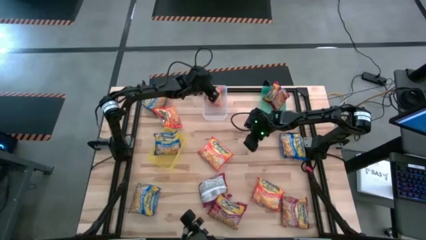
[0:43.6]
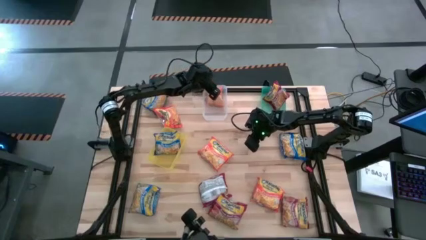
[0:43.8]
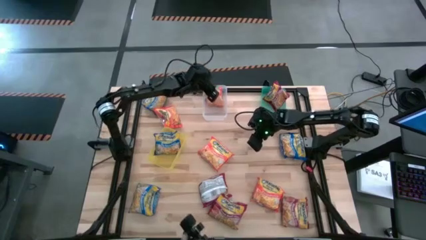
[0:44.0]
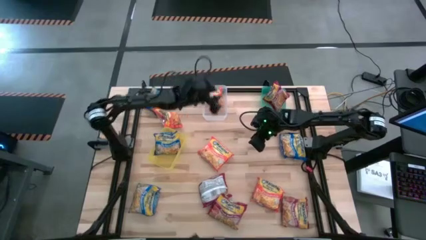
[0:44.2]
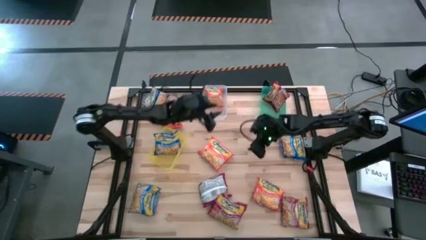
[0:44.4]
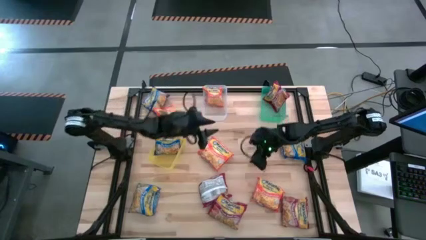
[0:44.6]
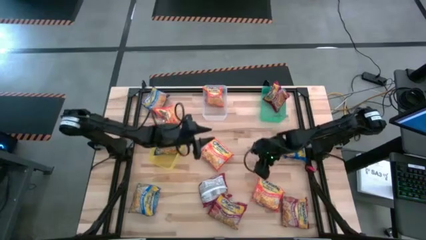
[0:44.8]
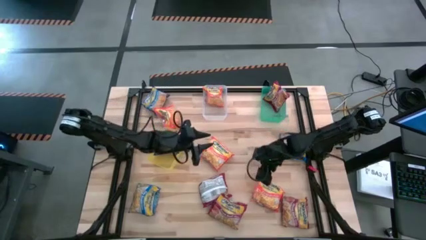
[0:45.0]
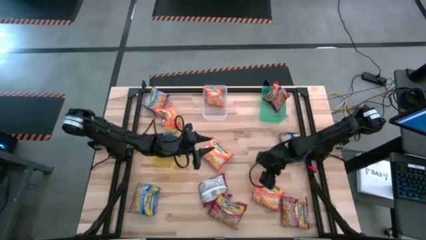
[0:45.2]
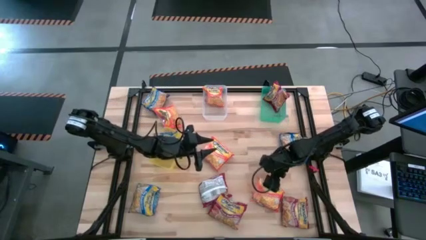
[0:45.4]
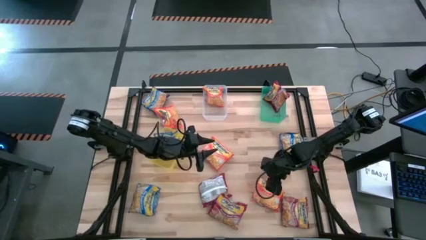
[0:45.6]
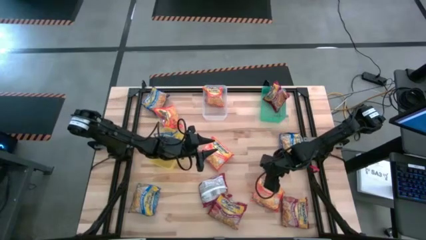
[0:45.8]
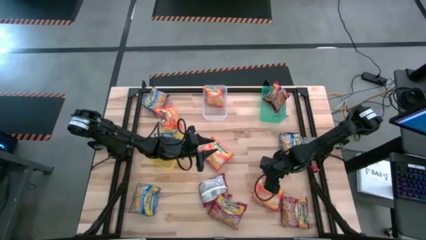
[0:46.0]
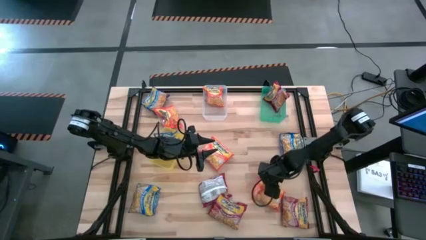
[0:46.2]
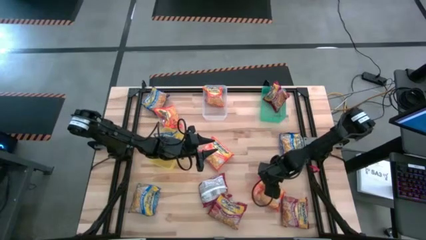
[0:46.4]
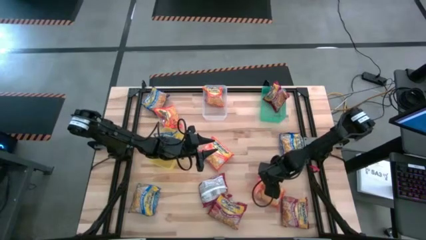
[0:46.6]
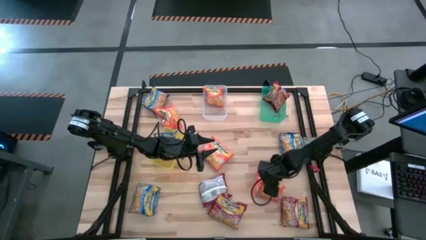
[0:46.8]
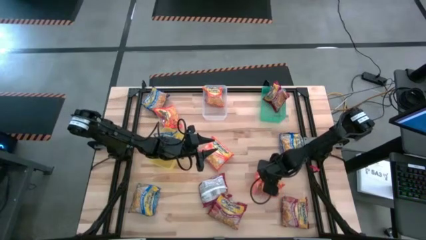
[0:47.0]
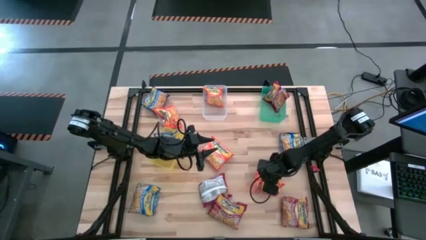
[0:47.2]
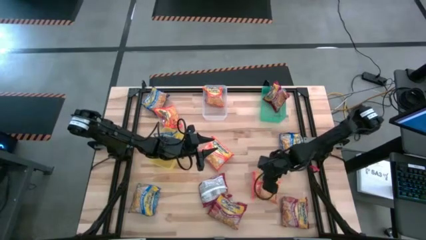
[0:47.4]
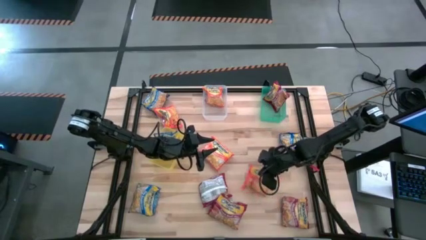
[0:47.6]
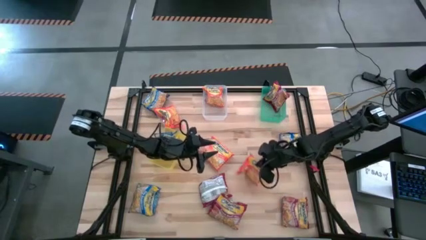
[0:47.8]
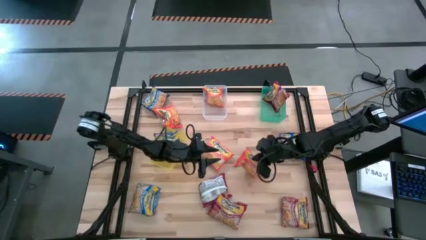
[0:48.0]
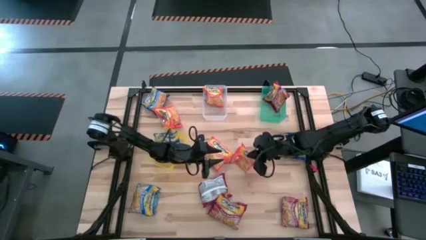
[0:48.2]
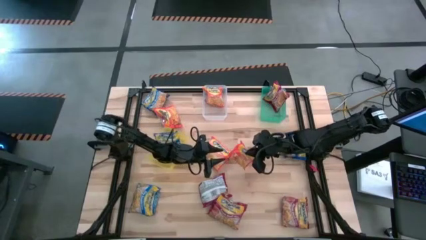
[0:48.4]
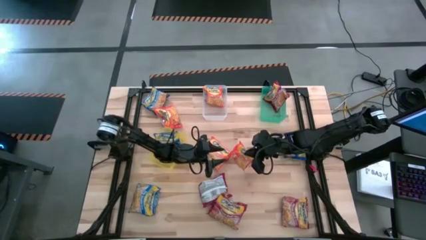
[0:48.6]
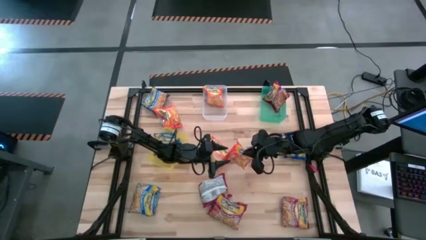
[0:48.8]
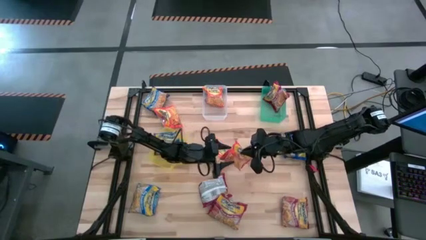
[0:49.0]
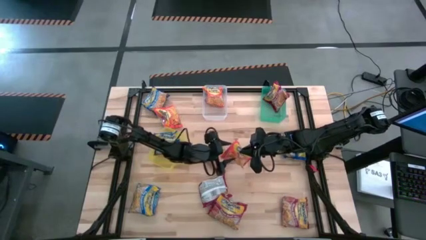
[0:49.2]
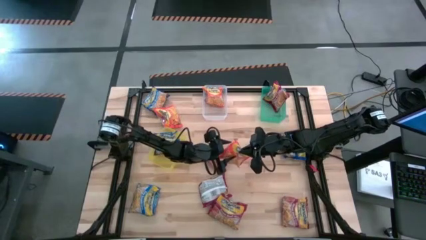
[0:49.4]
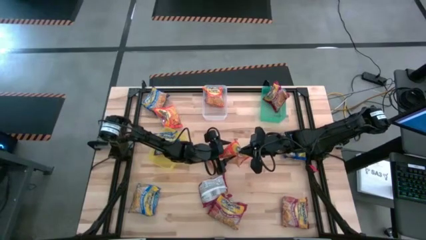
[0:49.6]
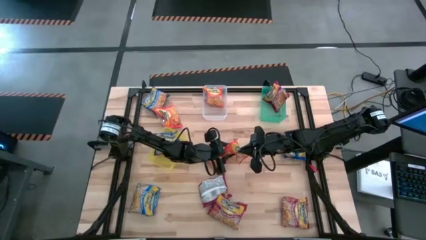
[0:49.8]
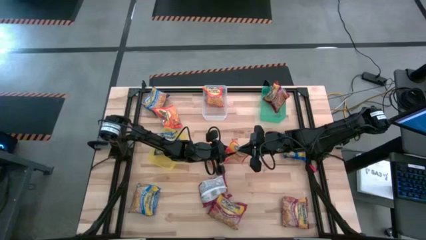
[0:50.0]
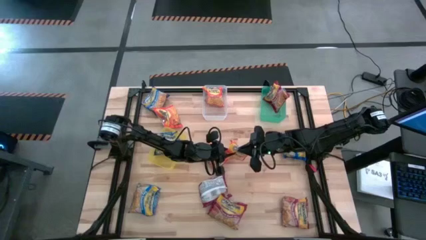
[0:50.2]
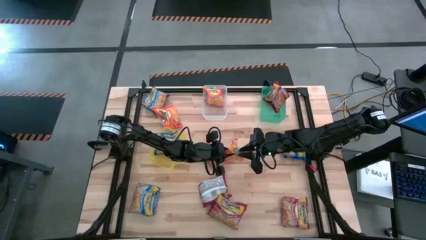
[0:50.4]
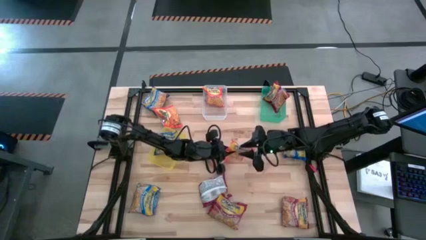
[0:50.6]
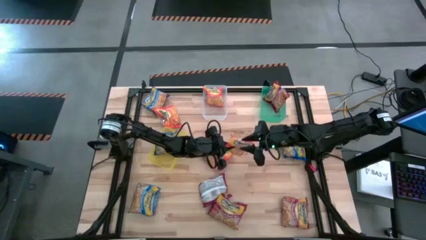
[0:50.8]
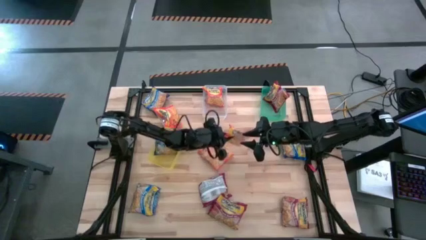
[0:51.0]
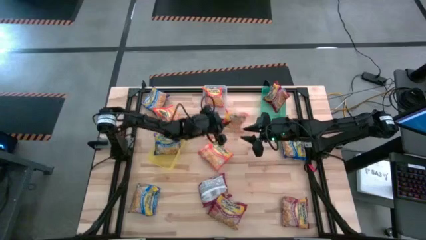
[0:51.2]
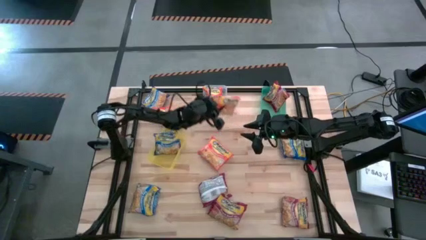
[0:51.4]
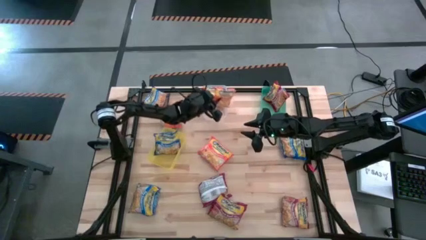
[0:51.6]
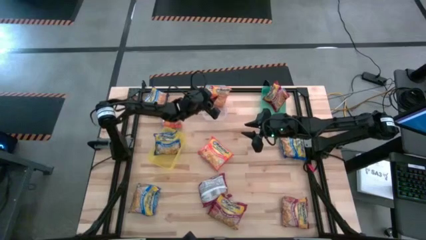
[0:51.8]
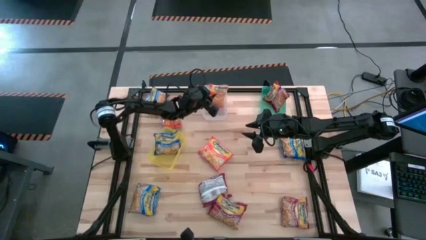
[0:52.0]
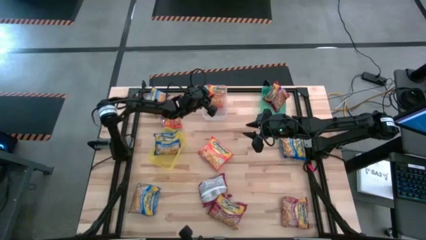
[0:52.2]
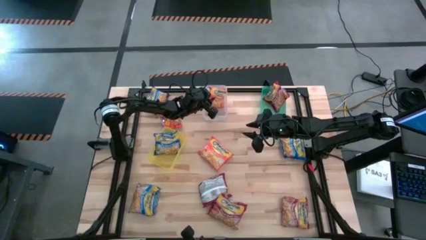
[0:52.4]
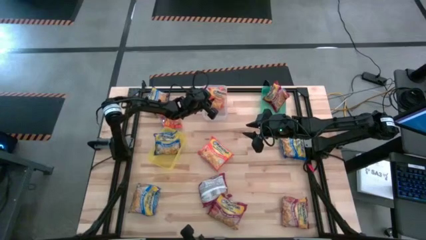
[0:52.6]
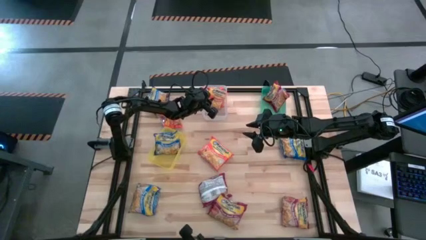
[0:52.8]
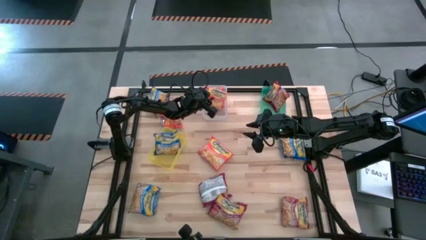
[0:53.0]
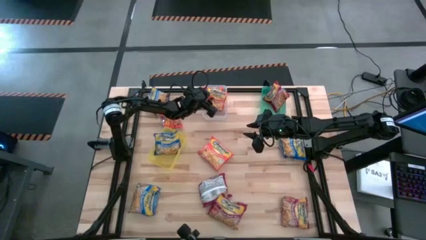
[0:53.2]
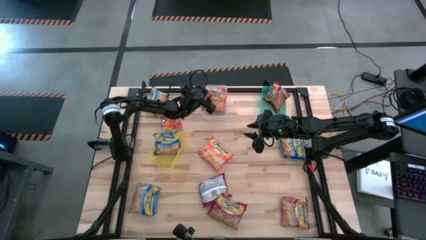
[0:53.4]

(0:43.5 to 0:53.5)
Task: Sort Maruchan noodles
Put the orange noodle pack into the transparent bin

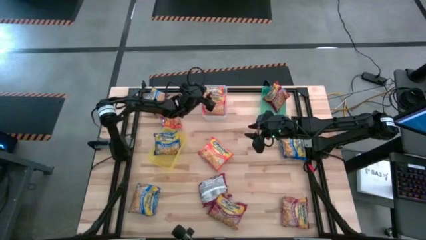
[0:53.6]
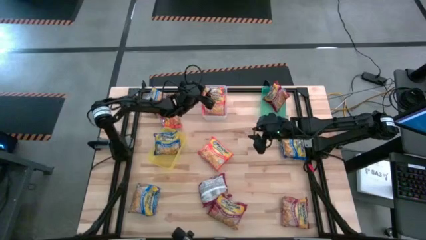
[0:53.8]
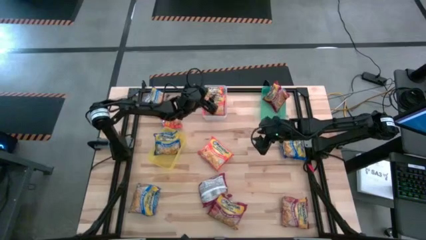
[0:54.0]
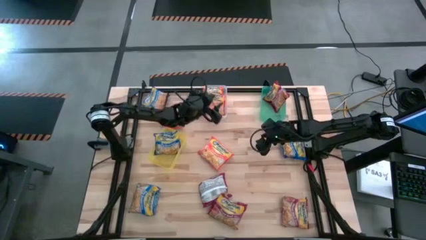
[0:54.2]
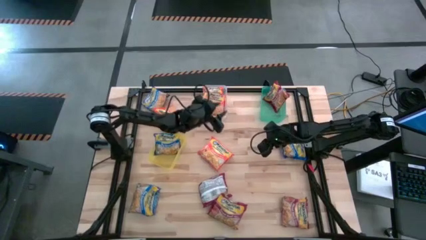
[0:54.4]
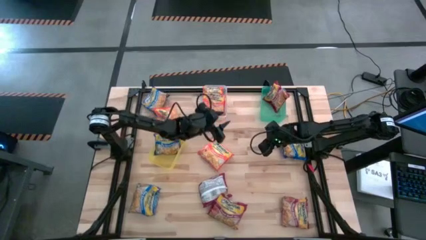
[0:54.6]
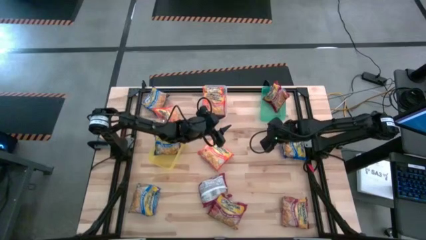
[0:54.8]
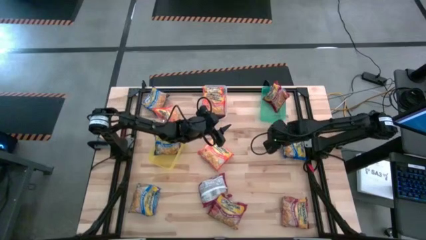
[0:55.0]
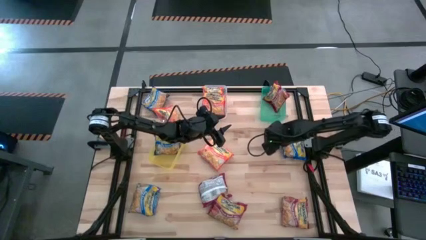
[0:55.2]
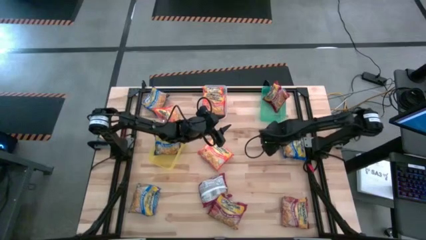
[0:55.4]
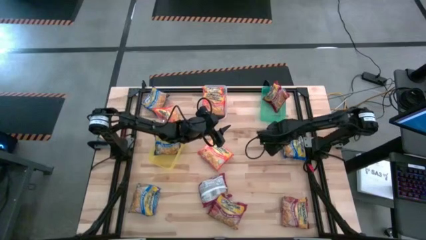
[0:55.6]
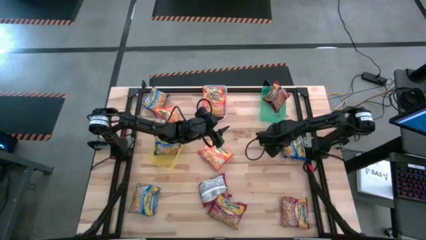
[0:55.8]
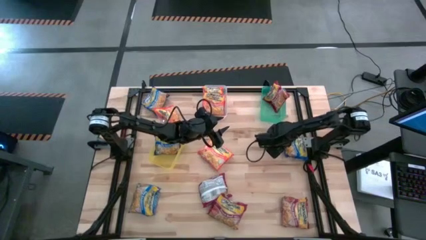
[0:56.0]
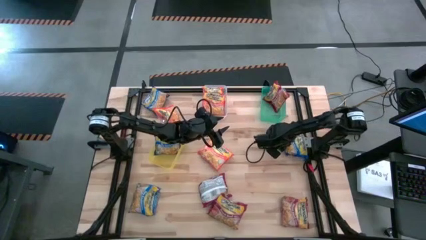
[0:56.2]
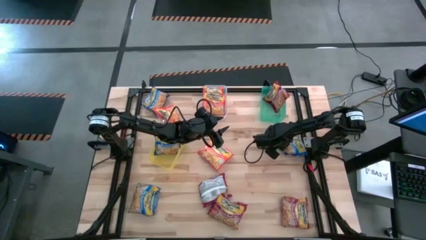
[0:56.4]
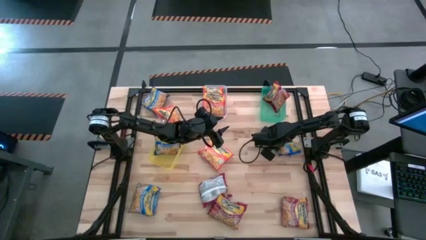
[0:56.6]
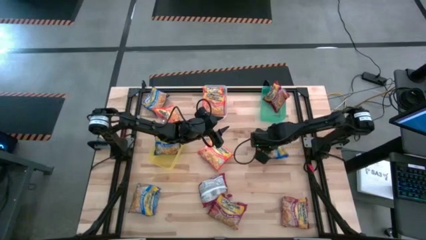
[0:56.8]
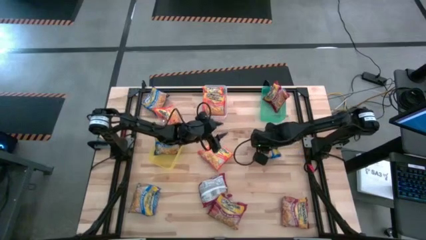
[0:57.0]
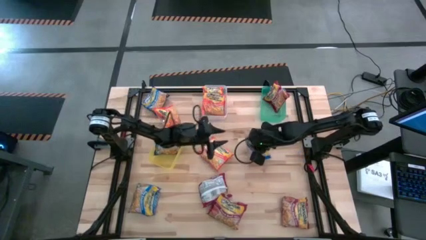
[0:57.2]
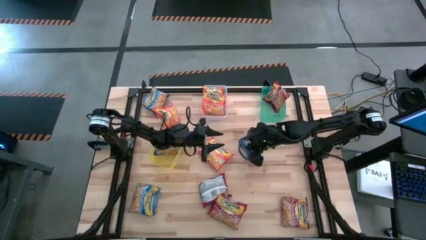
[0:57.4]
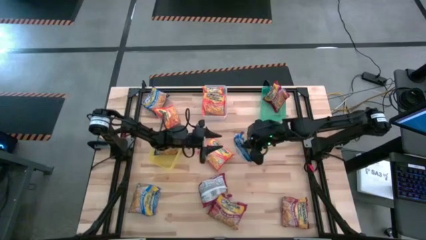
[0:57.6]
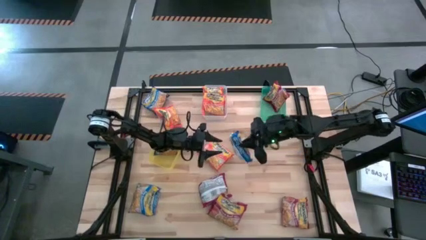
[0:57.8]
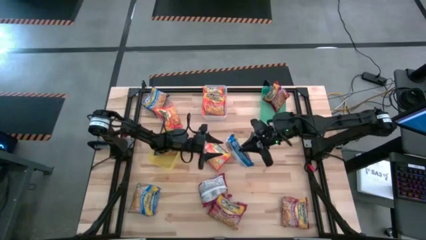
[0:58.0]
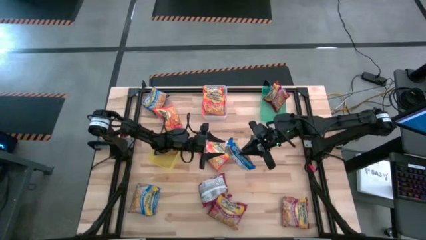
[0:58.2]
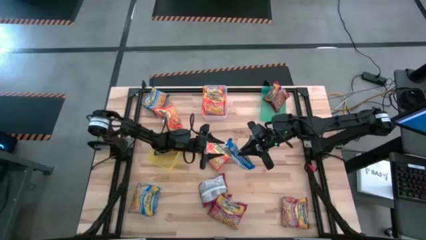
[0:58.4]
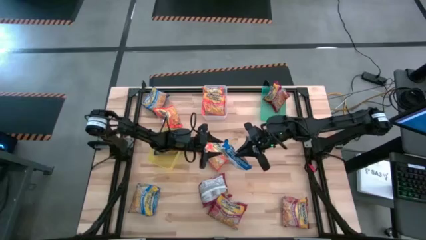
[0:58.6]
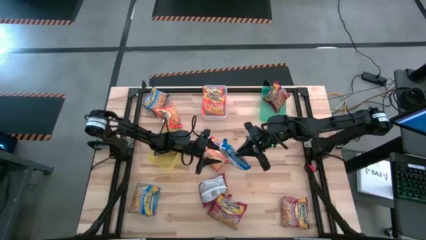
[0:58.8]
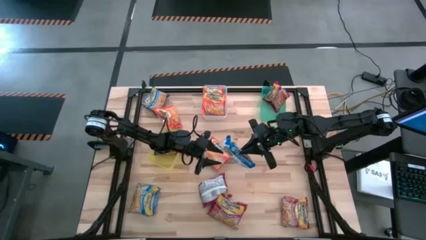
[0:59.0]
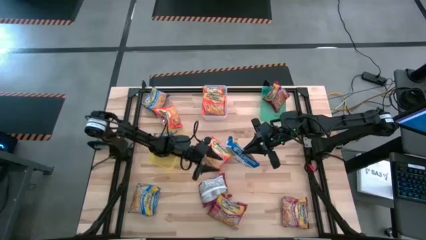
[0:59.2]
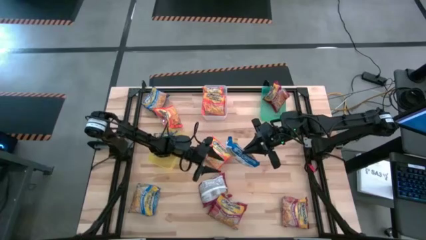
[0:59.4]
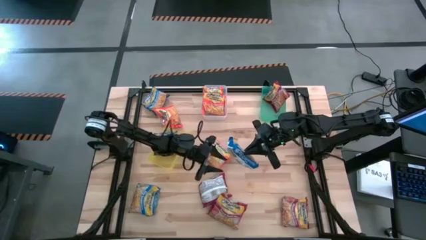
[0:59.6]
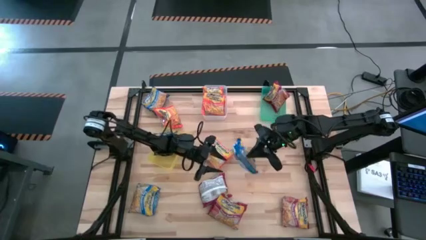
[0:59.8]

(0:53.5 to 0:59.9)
Put the blue noodle pack into the yellow bin

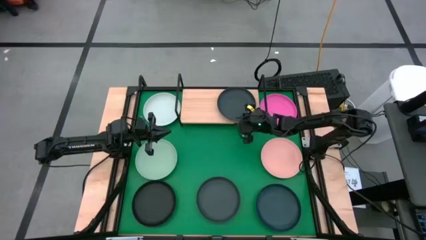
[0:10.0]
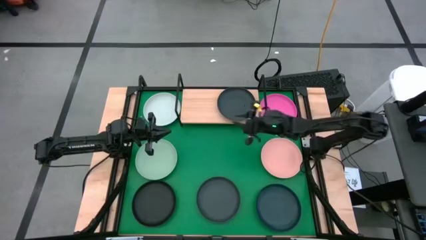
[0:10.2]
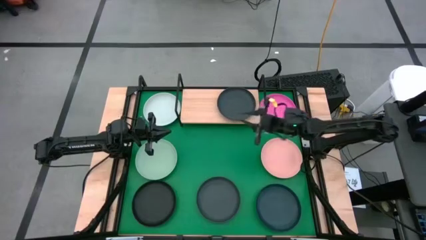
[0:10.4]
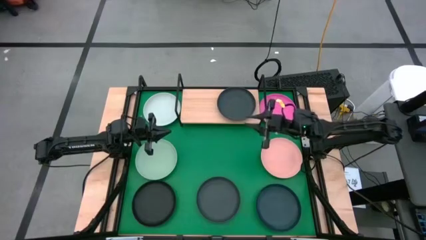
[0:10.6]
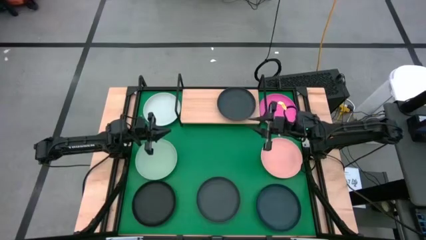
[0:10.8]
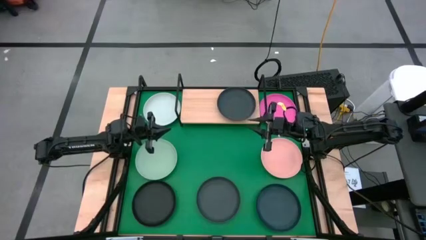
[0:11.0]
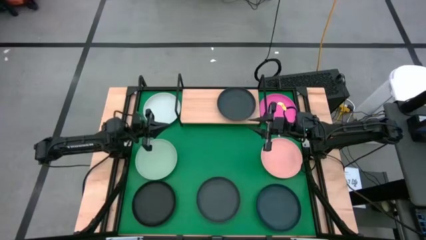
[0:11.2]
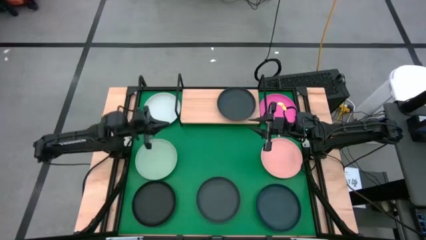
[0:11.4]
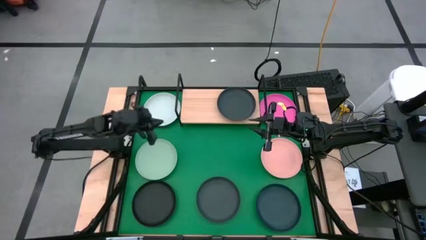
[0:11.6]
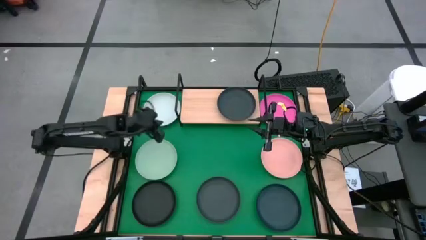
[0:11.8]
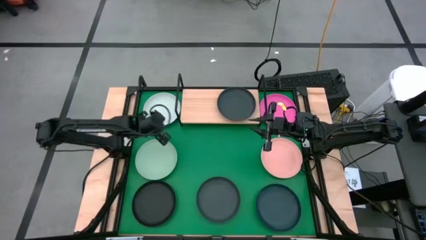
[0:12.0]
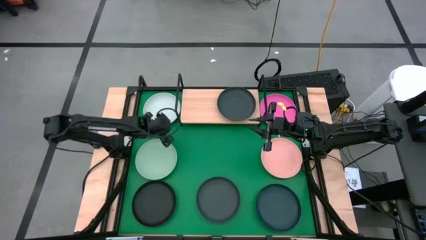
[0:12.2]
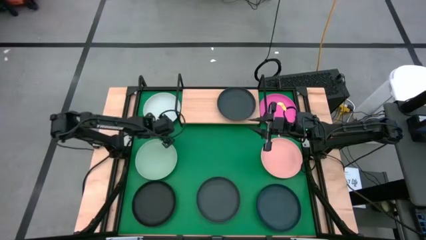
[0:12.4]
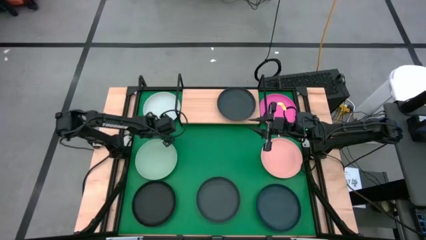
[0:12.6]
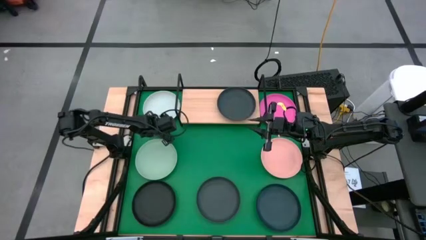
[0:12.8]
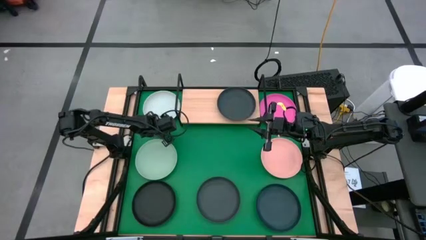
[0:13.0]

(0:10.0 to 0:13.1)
Task: Place and stack plates onto a shelf
Stack the white plate on top of the black plate on the shelf
